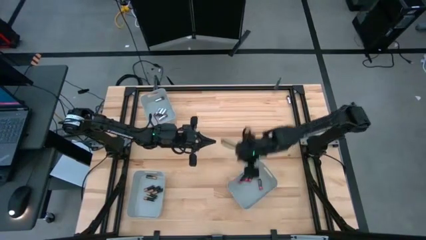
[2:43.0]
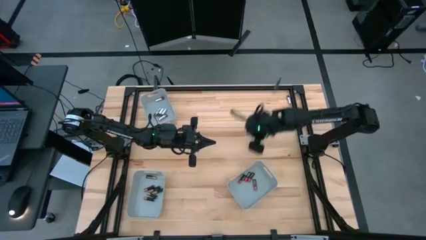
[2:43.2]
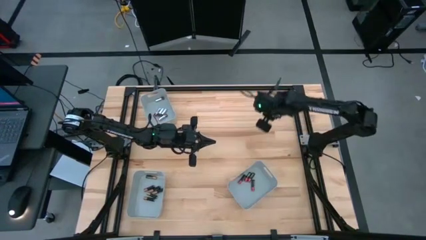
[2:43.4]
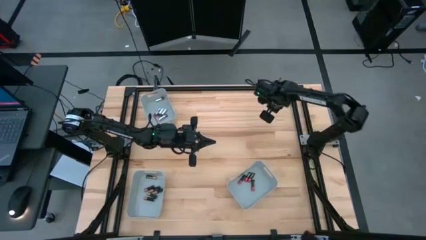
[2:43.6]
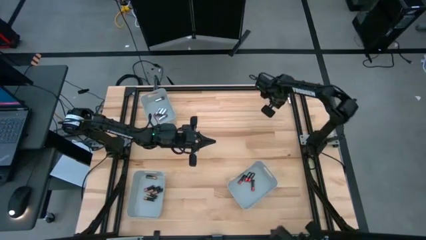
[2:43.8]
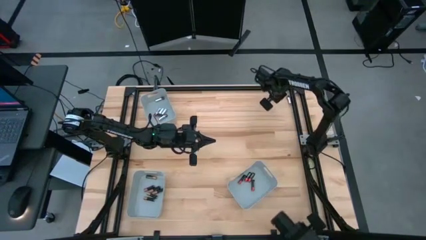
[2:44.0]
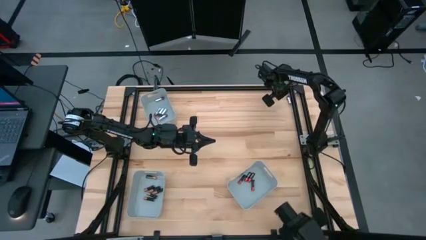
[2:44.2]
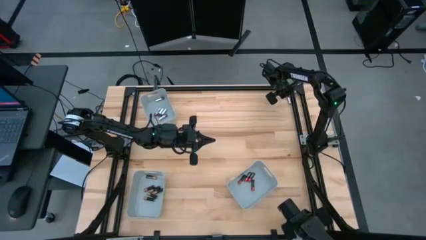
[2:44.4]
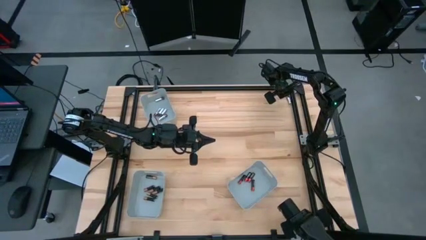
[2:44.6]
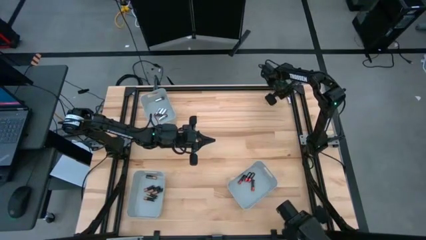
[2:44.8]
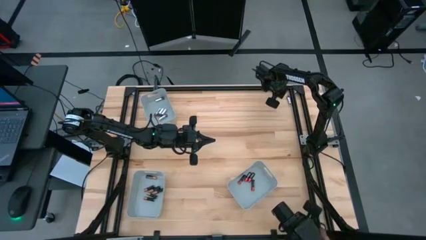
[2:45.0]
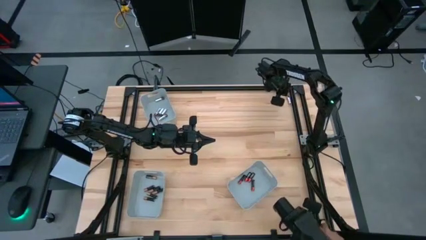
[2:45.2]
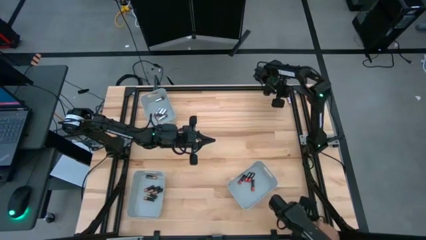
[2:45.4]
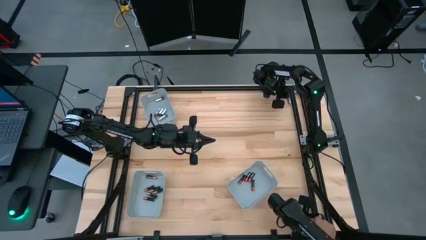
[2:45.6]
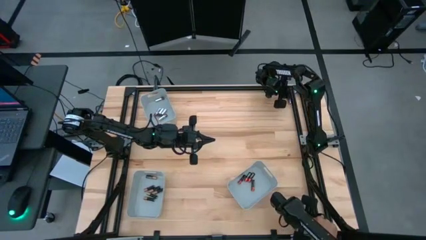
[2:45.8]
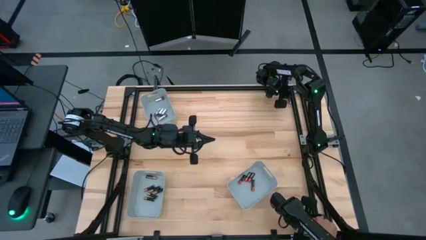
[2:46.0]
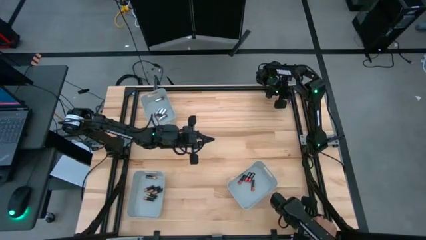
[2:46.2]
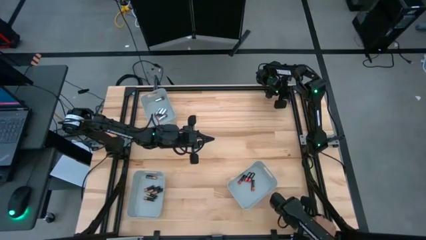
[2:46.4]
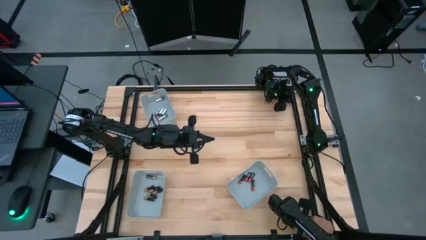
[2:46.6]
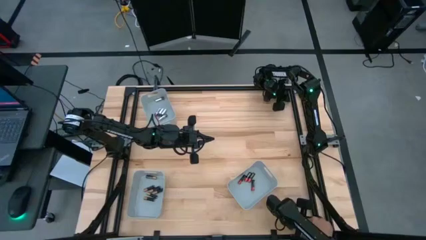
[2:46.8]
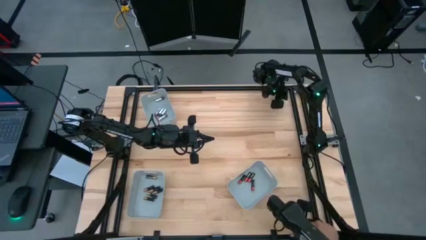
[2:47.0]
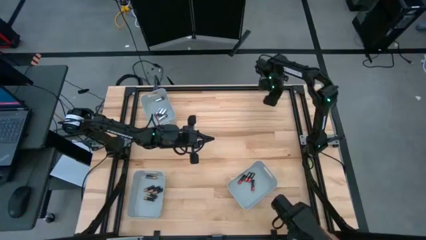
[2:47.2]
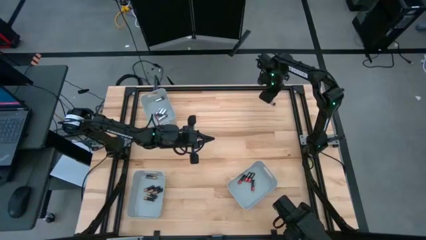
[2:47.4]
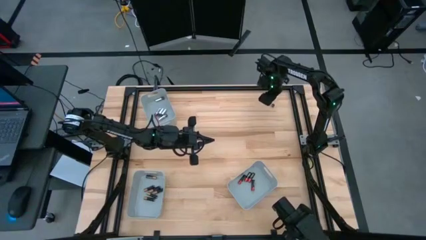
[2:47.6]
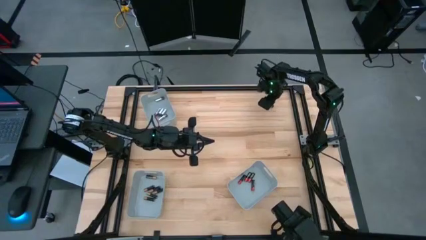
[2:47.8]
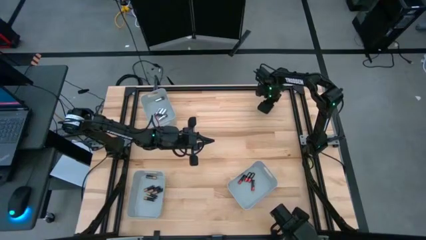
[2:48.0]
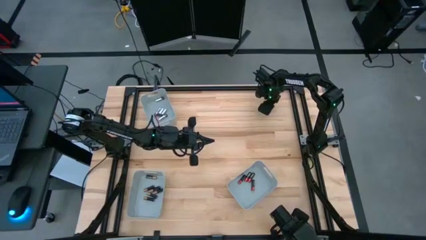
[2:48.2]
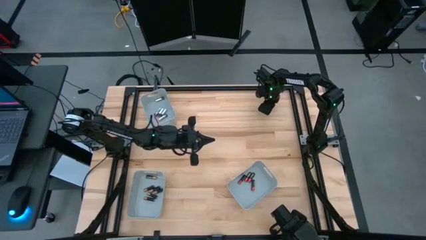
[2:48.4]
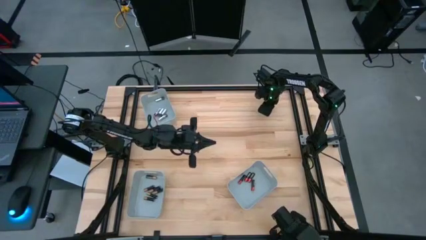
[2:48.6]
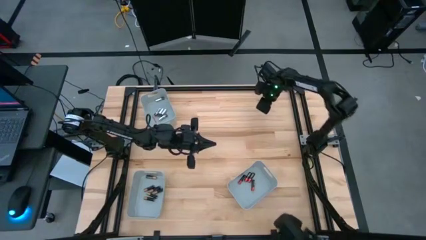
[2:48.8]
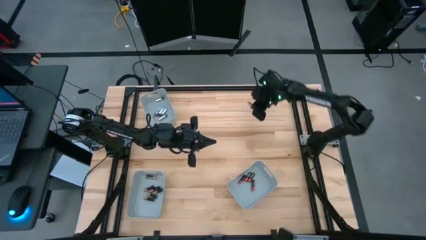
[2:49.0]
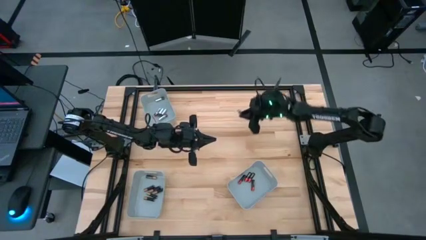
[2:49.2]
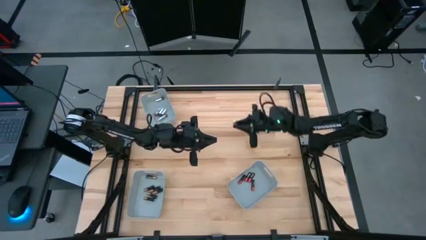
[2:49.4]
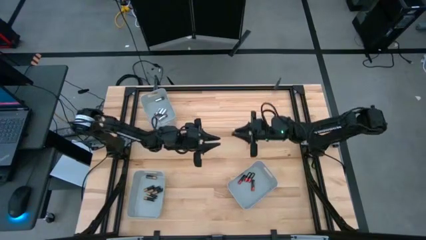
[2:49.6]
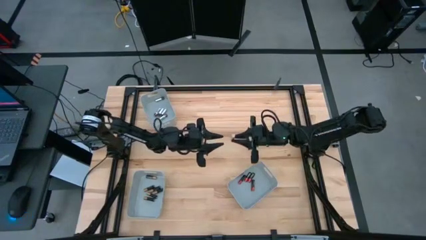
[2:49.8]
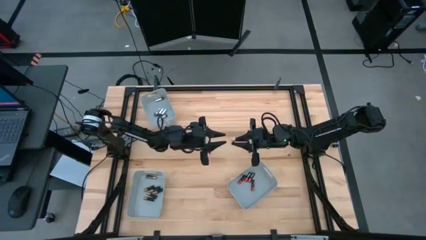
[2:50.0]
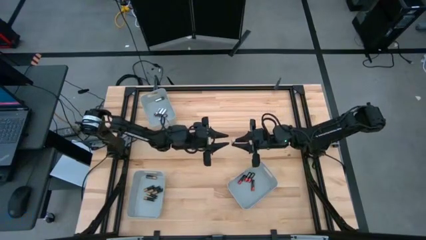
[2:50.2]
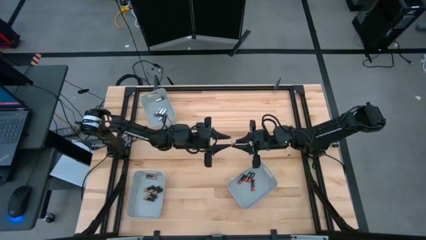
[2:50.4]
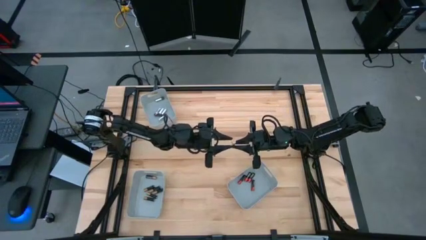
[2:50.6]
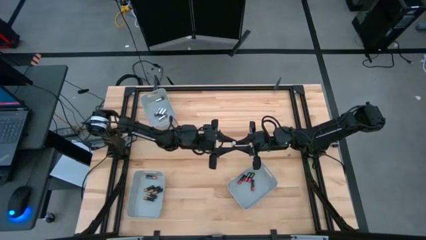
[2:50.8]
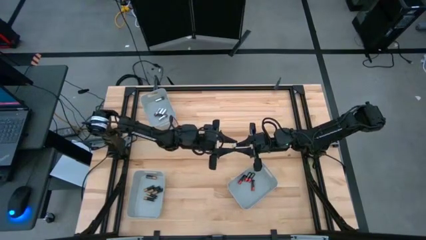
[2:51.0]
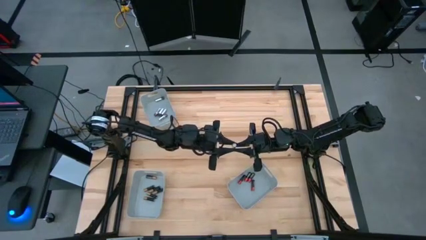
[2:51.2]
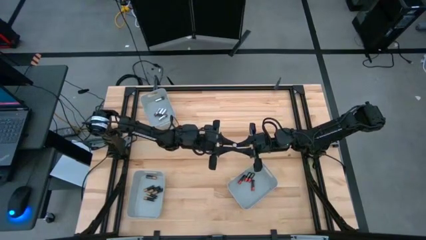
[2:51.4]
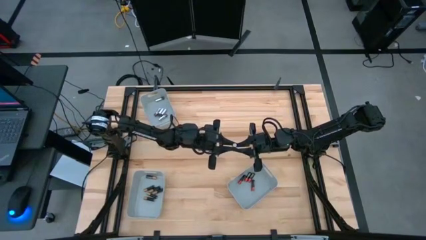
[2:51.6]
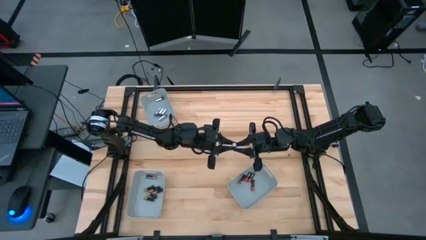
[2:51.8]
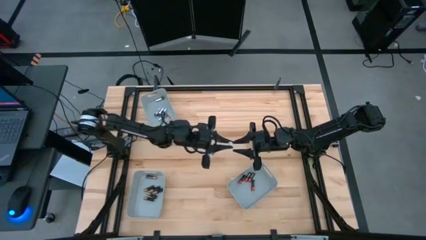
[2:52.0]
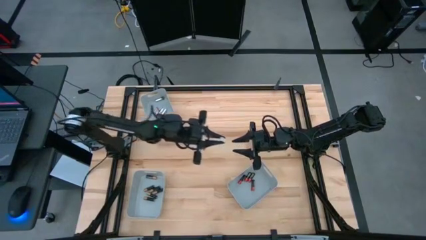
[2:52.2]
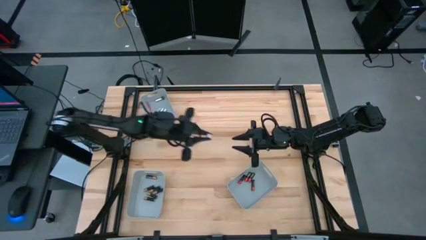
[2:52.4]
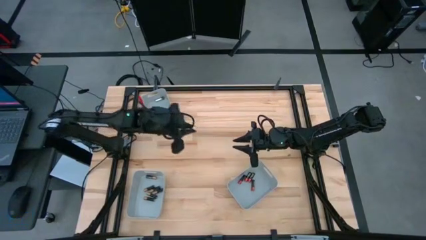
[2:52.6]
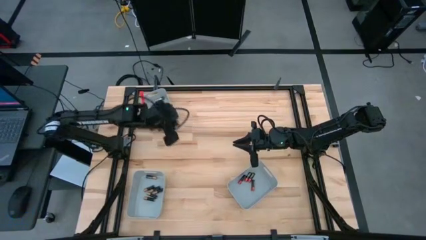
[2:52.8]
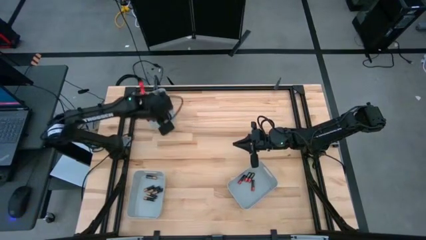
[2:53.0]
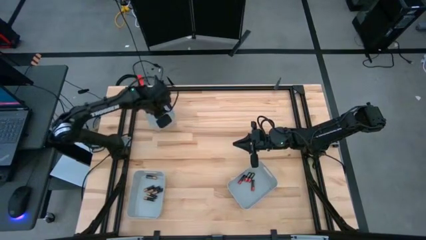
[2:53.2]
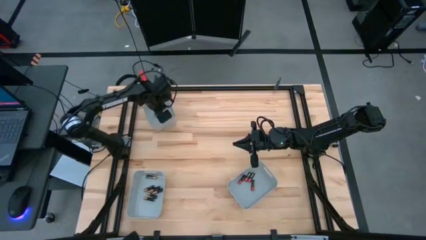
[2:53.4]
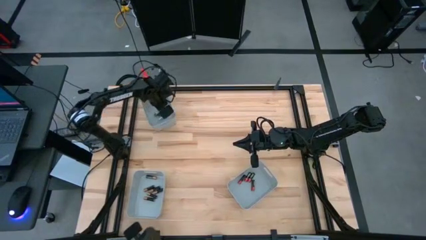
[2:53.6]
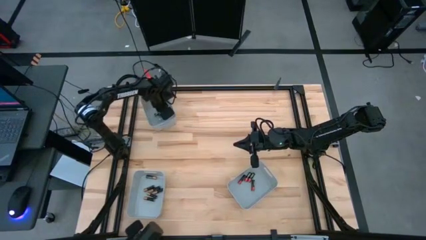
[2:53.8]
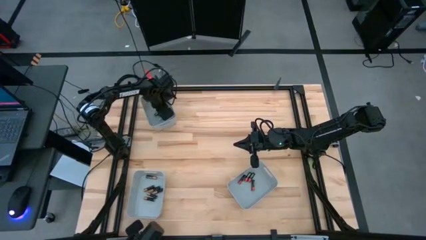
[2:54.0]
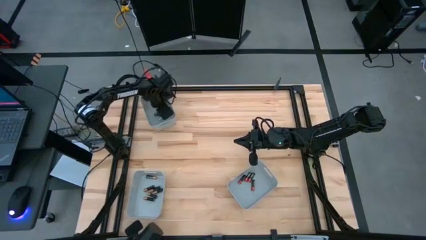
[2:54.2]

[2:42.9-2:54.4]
Task: Sort batteries
Put the silver battery into the top left gray bin

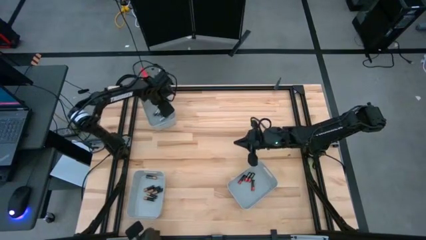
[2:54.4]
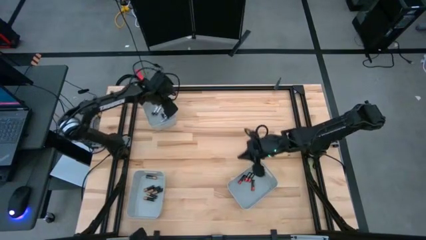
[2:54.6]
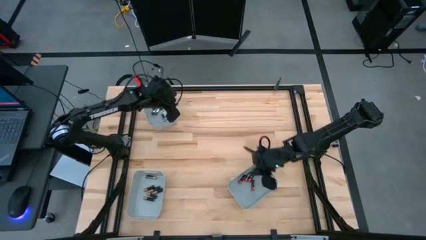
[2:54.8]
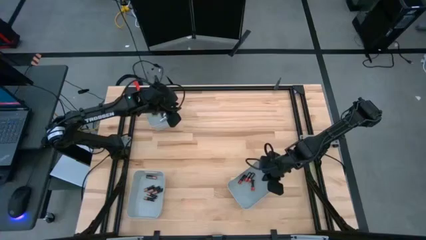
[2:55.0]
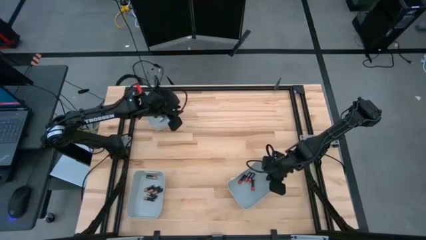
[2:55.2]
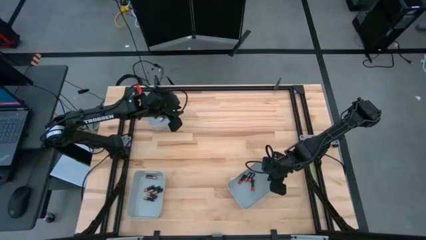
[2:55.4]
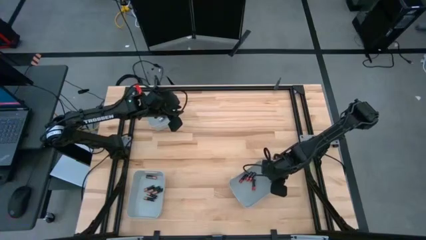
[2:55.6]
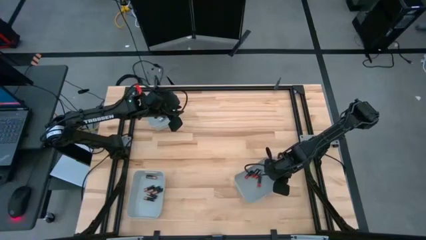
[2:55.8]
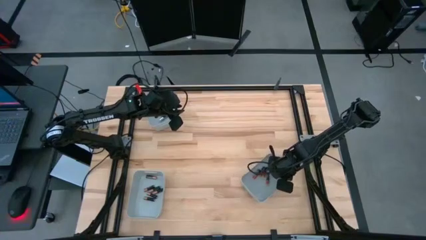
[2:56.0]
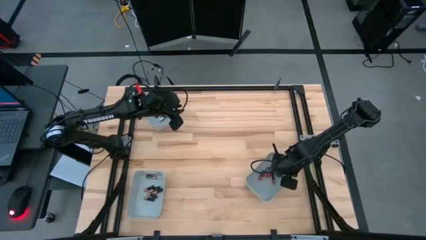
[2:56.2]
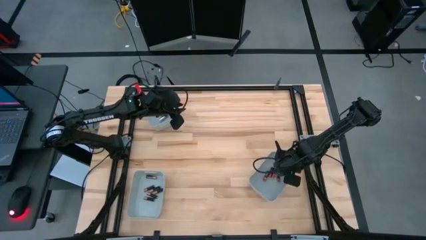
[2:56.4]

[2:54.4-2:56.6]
Adjust the bottom right gray bin

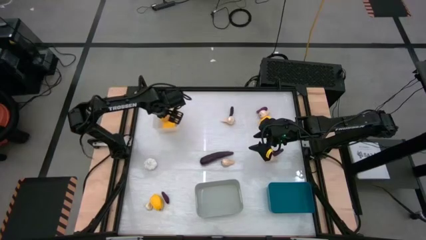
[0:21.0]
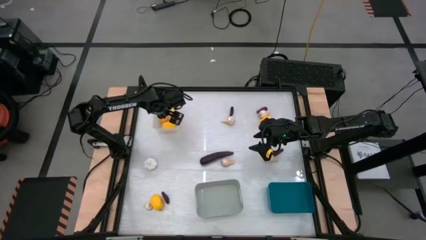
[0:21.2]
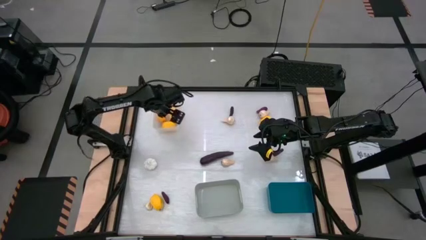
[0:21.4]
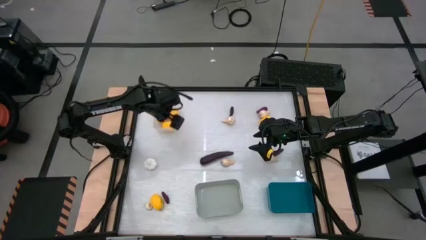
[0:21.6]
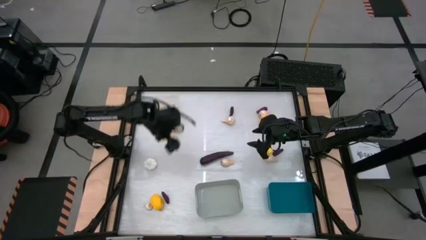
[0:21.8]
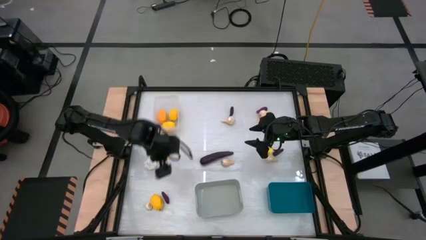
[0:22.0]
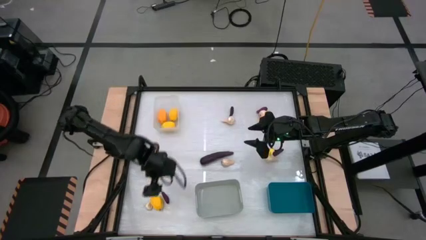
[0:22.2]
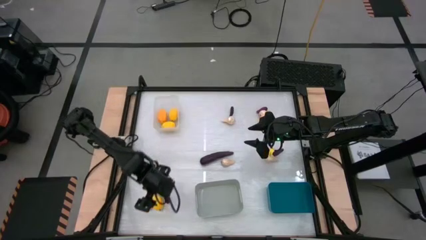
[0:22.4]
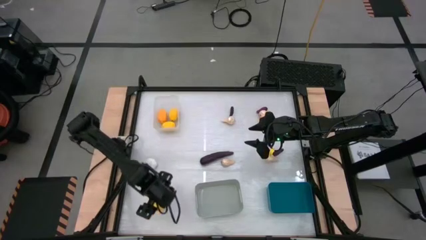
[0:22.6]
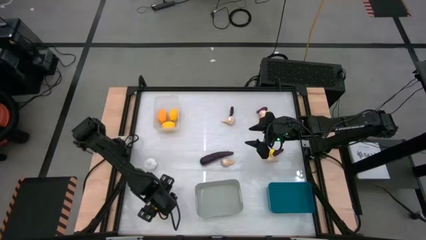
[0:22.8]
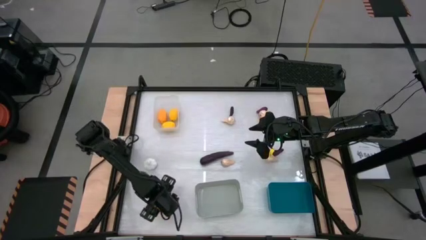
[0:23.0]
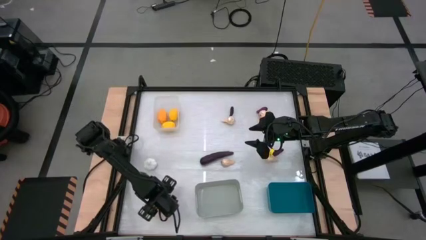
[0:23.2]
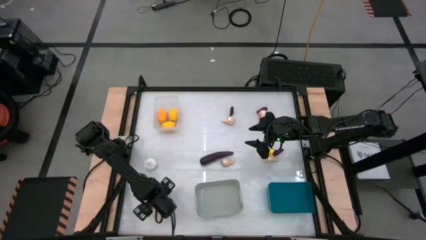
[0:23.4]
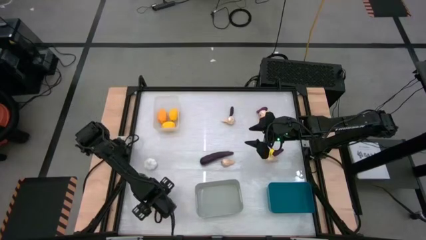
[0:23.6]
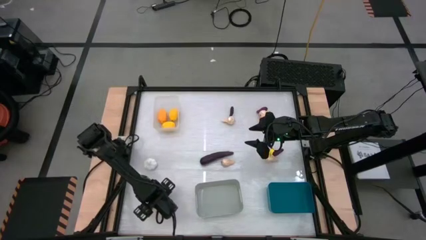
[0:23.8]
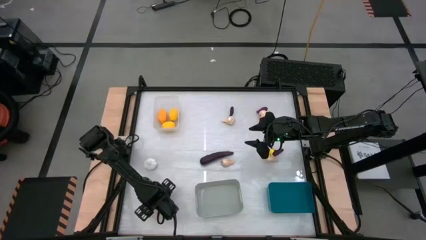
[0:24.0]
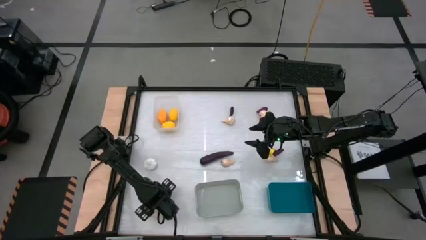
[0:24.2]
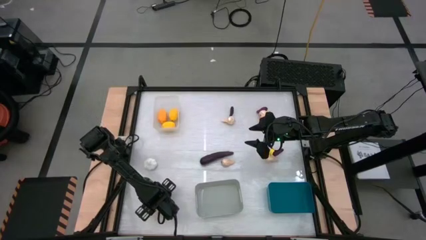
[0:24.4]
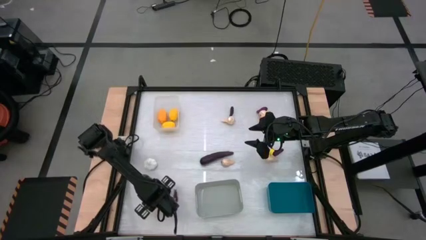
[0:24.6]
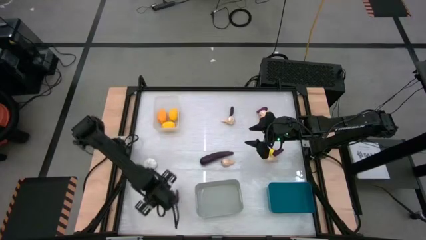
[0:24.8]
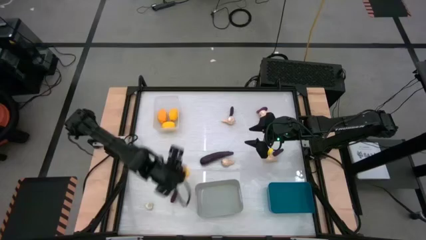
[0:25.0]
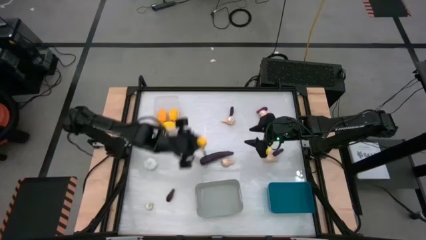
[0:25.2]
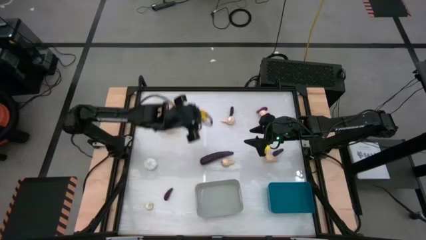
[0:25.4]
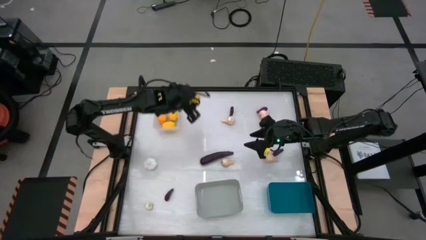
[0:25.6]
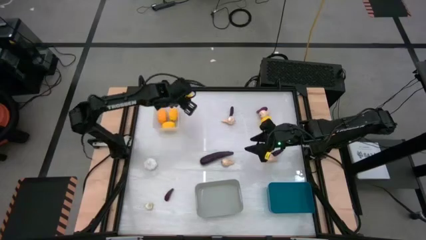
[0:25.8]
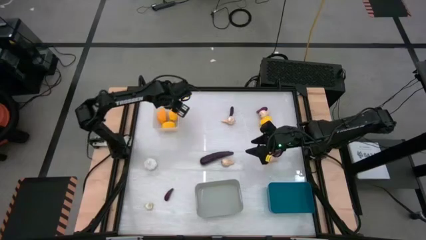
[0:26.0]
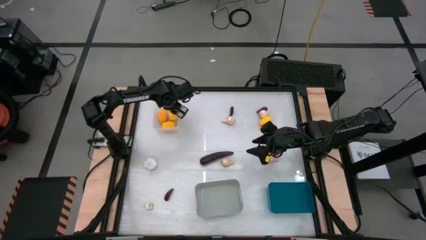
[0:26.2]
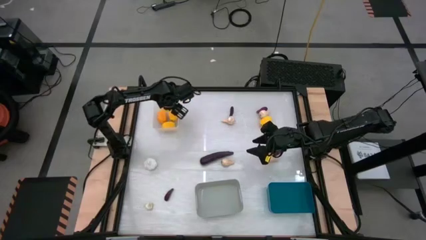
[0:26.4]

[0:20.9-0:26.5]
Task: Sort produce into baskets
Put the lemon into the transparent bin
